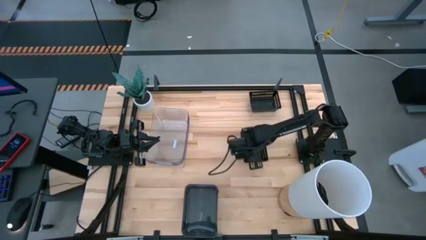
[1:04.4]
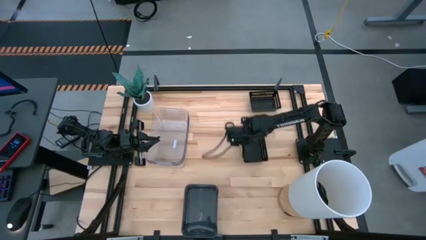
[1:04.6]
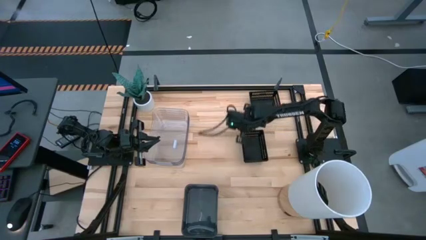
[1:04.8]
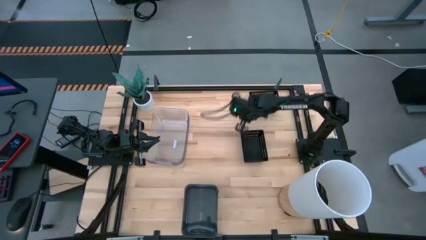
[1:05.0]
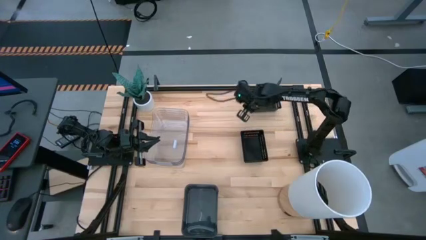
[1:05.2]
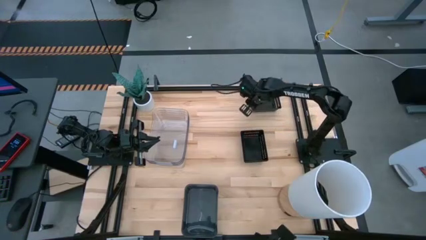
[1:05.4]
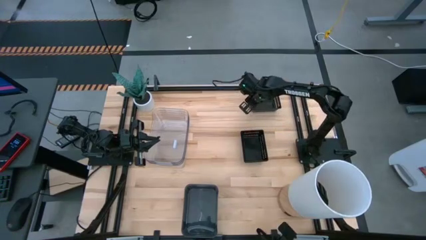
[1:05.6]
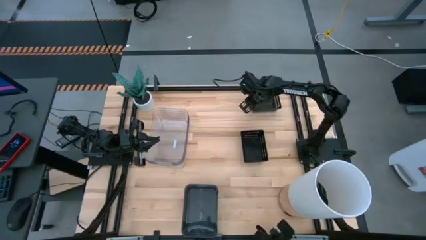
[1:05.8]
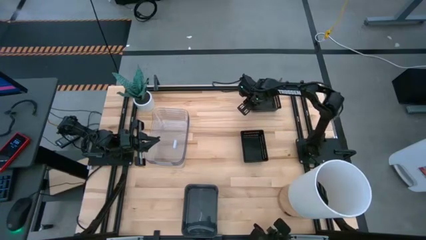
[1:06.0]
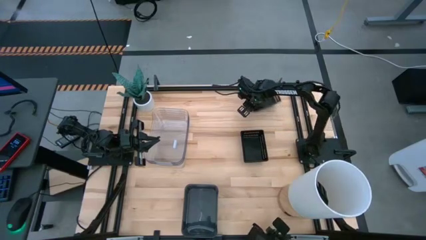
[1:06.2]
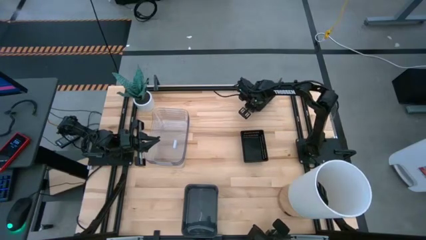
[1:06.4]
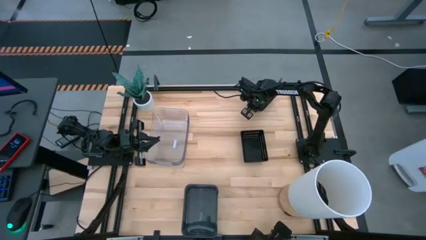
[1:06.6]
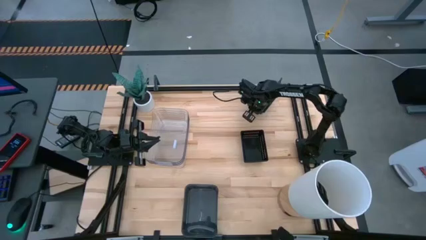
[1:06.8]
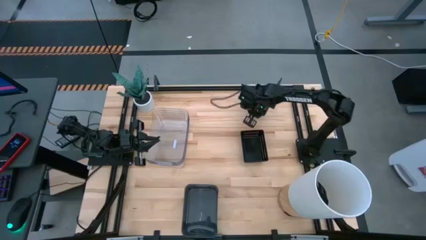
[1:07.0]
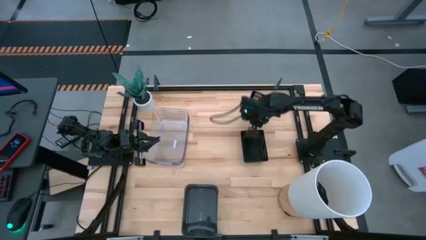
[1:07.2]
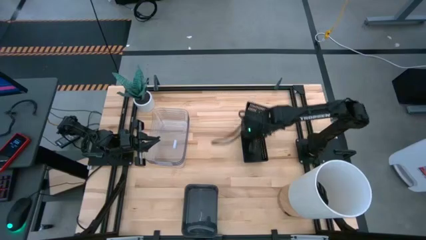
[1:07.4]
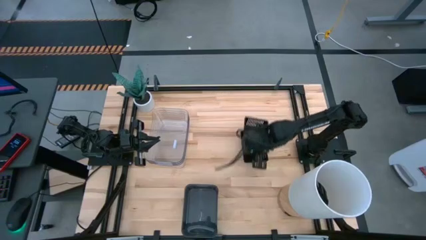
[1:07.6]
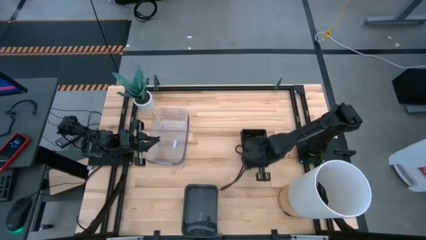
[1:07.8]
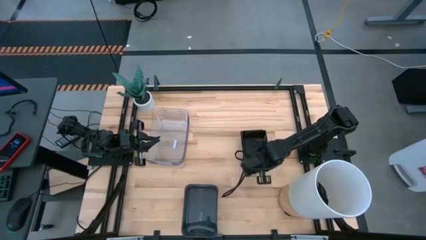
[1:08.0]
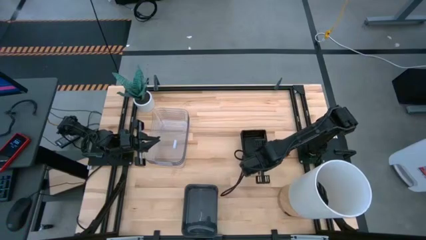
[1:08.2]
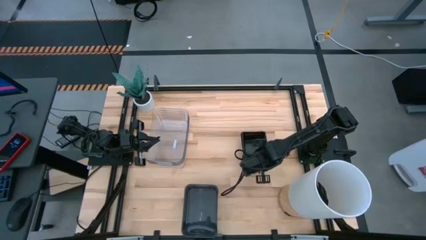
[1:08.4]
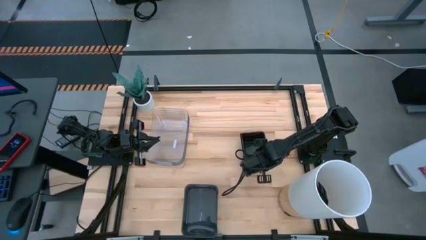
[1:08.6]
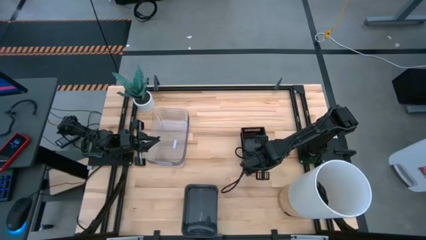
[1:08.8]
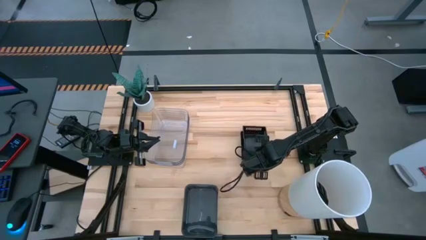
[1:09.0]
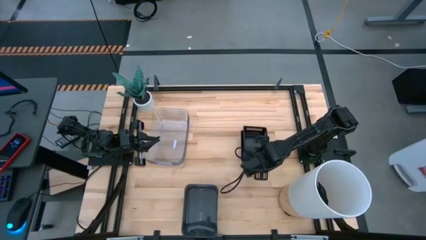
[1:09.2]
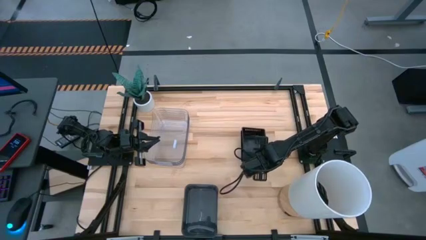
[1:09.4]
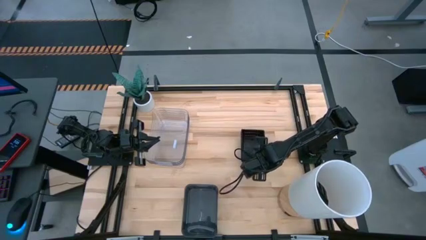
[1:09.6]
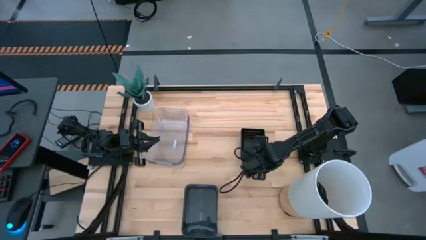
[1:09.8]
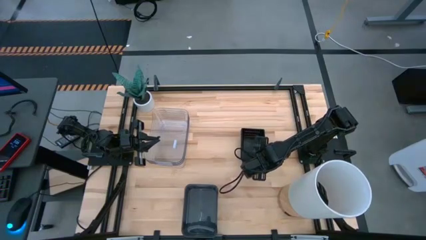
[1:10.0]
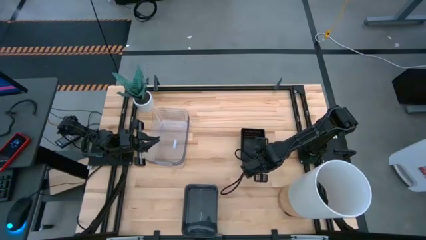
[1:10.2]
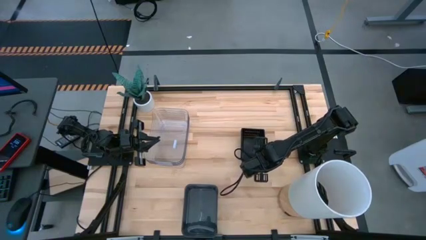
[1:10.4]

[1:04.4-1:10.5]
Stack the black bin on top of the stacked black bin

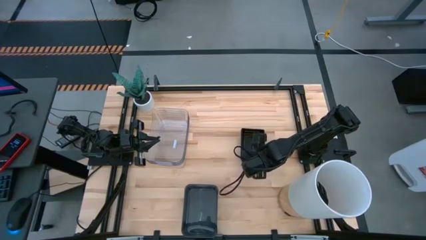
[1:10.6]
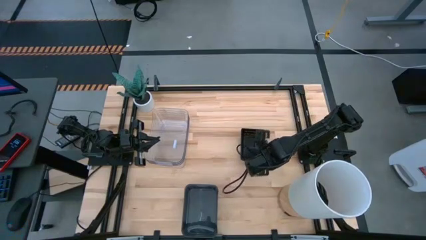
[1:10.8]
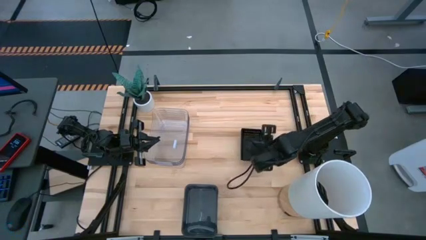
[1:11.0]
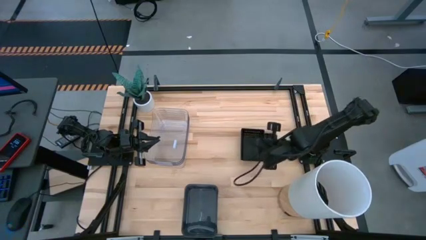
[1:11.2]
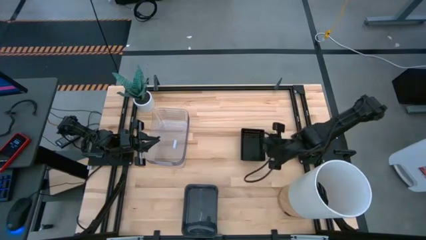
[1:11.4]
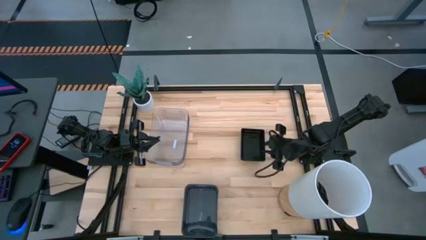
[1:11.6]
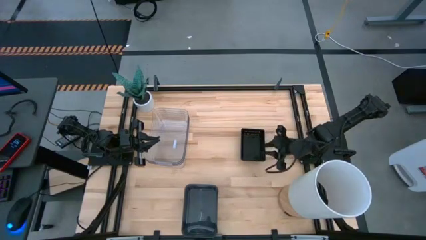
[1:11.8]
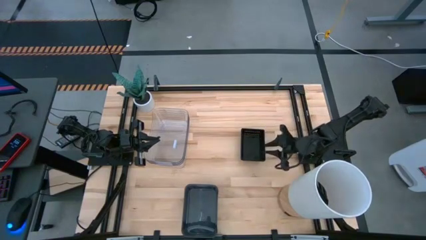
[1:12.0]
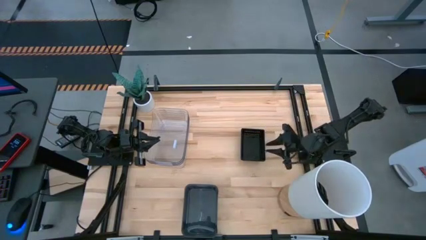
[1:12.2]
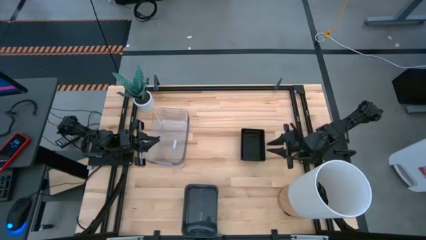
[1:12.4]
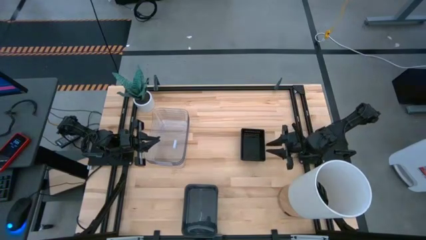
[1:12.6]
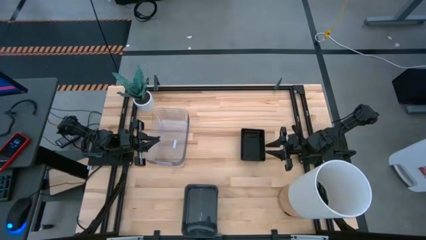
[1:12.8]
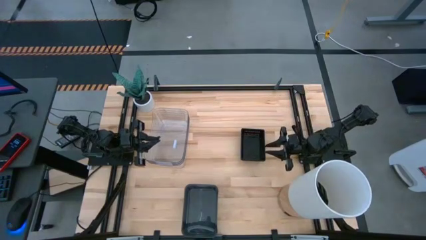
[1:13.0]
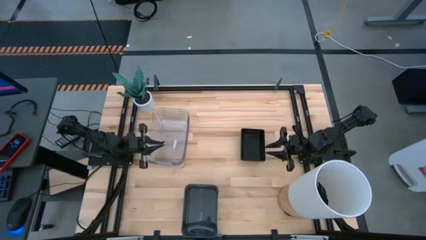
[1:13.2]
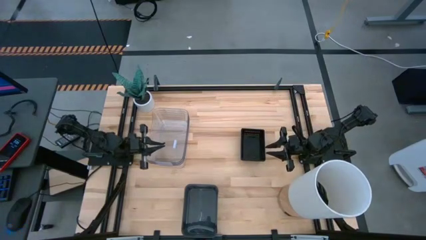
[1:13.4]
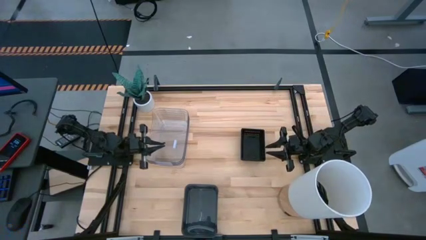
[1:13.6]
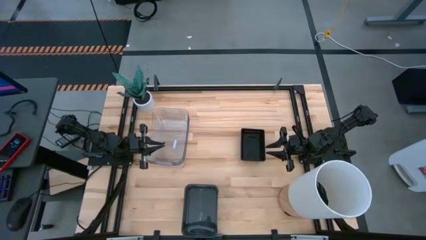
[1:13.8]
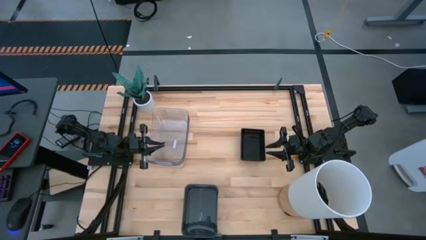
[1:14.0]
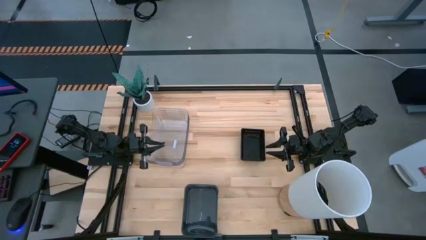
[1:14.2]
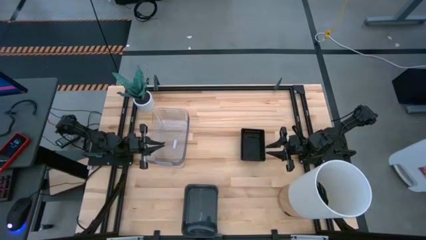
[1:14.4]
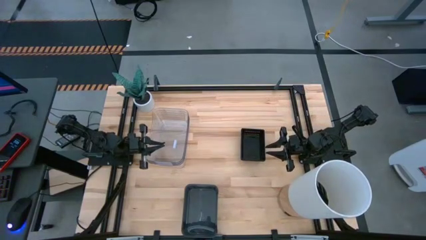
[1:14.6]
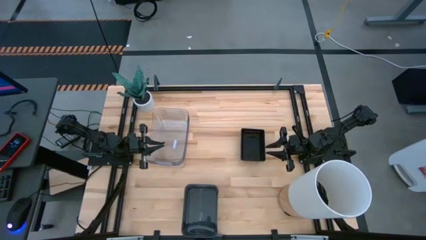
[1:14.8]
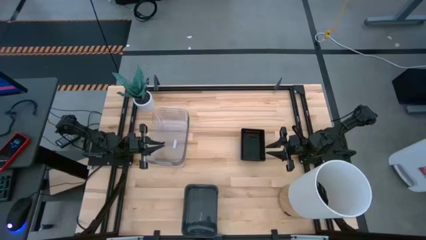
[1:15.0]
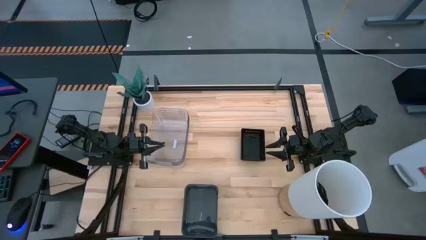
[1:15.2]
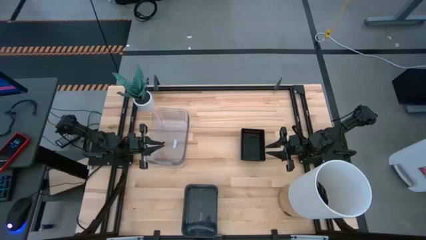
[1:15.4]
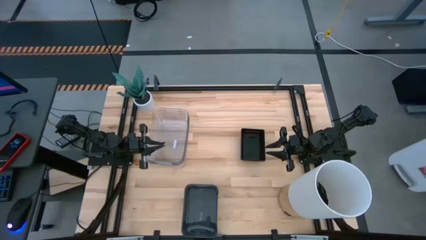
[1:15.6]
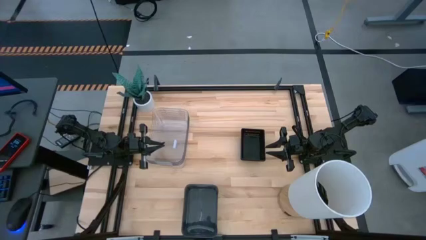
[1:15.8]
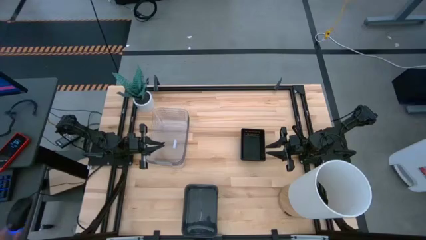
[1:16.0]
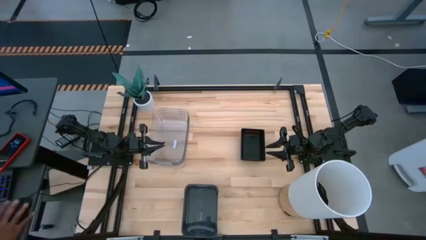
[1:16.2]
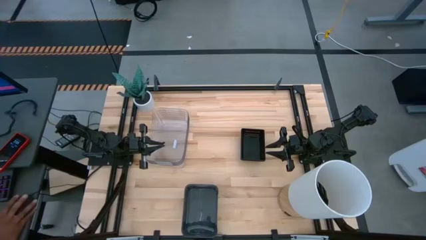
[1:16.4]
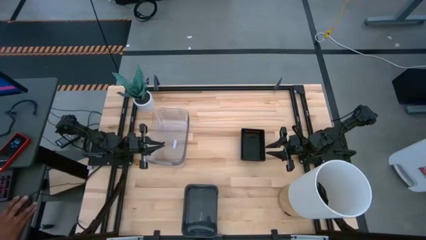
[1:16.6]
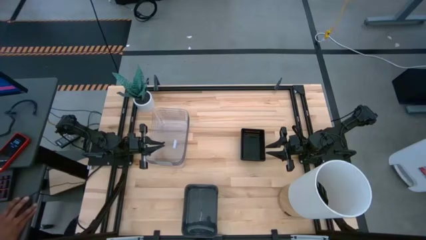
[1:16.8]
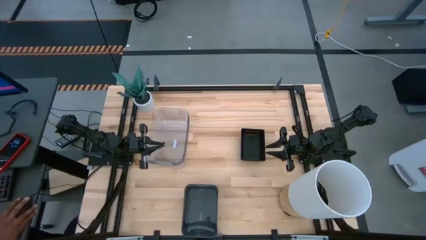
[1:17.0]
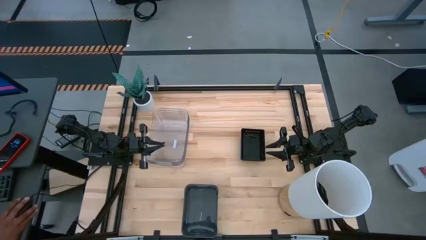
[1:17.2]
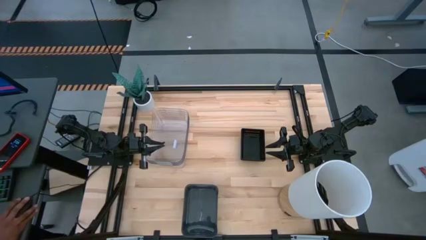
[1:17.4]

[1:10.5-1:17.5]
Return to Home Position

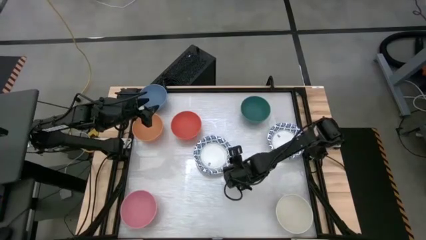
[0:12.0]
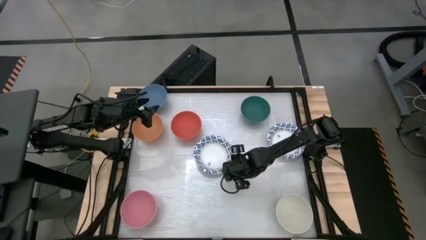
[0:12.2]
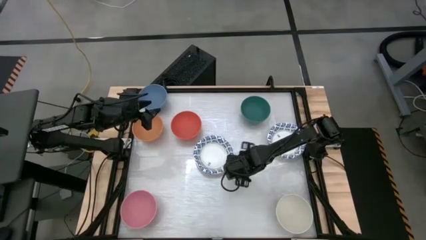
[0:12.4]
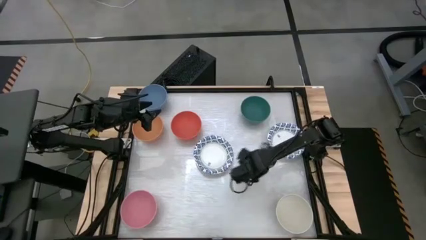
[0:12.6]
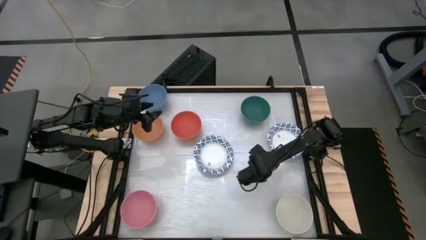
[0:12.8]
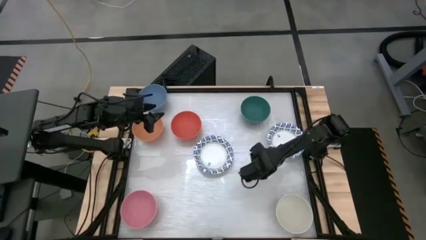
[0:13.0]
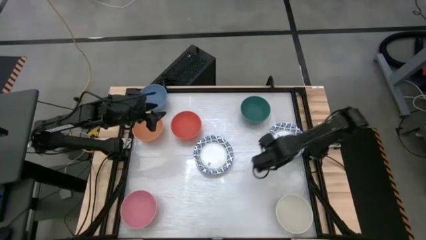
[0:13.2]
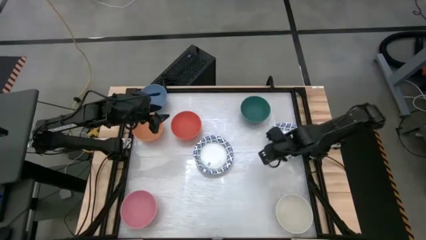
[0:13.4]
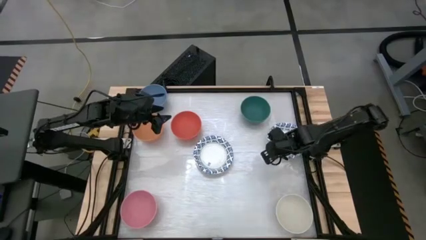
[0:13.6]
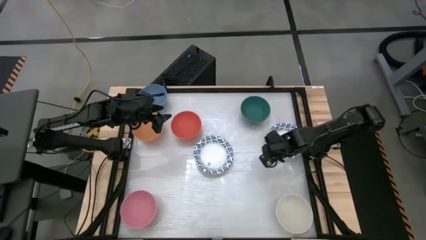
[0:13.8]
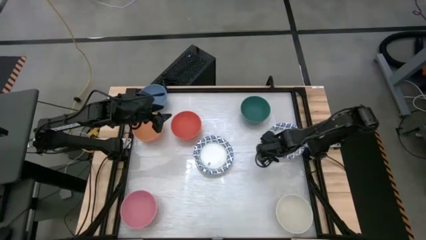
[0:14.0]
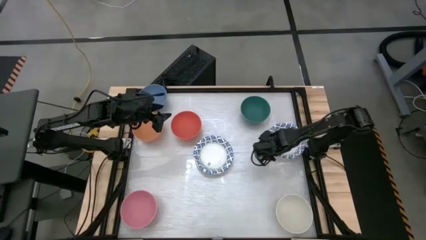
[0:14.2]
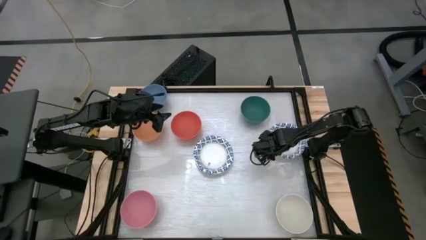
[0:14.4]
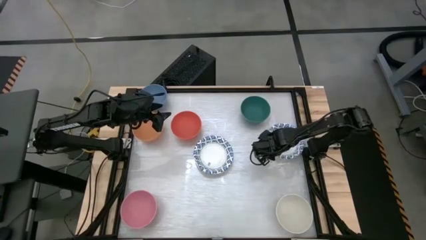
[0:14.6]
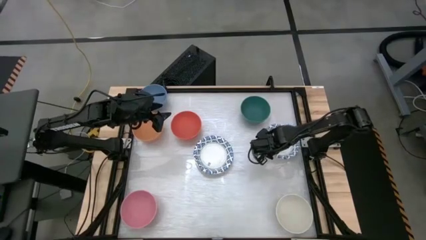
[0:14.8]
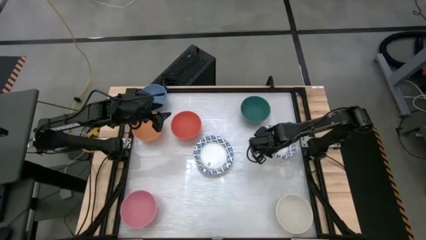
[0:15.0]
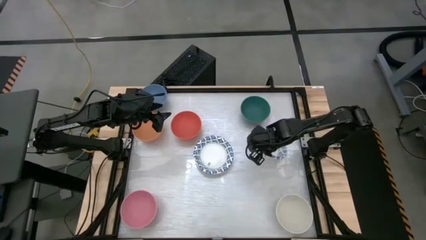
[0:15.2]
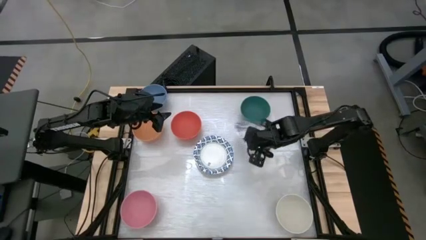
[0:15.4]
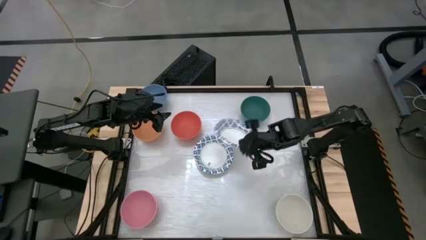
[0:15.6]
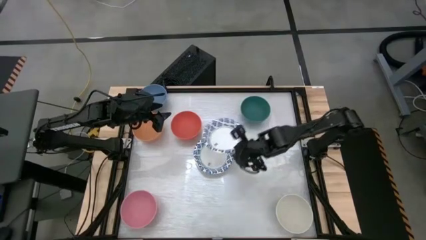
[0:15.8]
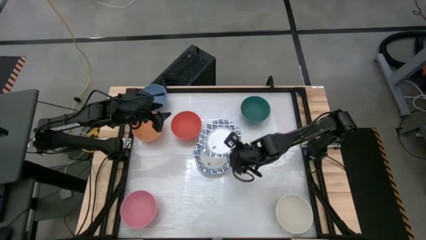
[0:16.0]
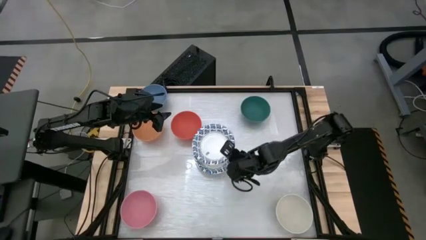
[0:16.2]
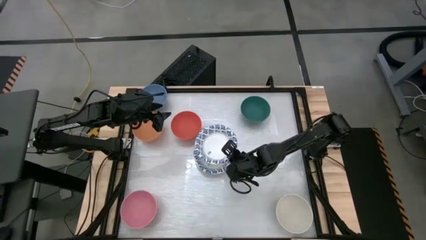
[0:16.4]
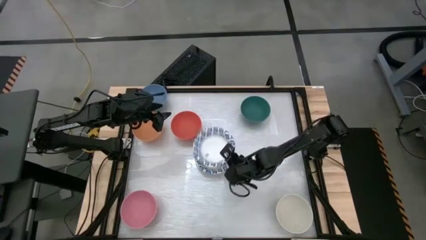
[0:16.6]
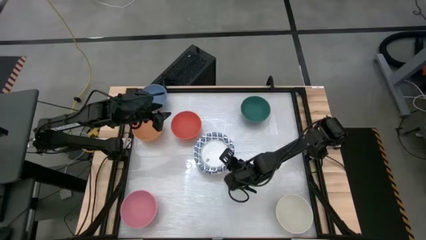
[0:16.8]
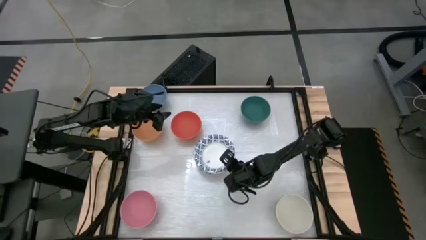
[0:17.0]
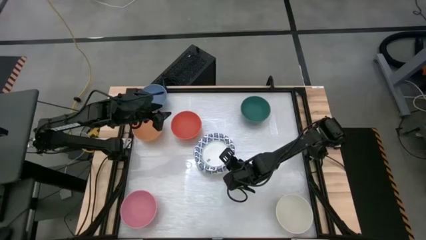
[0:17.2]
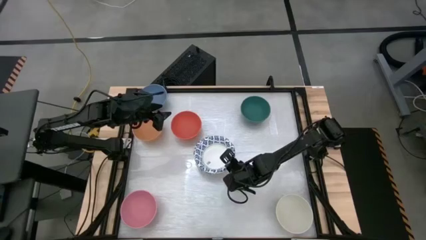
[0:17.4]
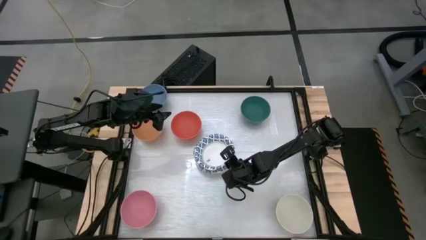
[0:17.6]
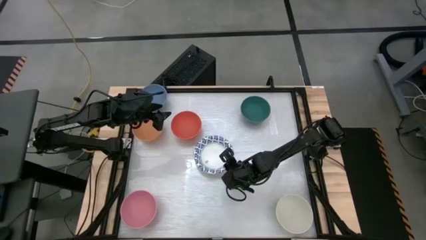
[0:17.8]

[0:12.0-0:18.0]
Stack the white and blue plate on top of the white and blue bowl
